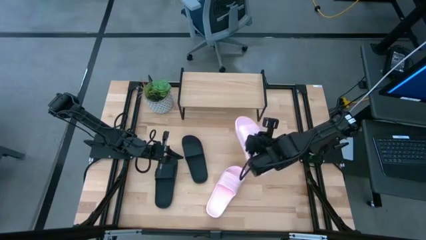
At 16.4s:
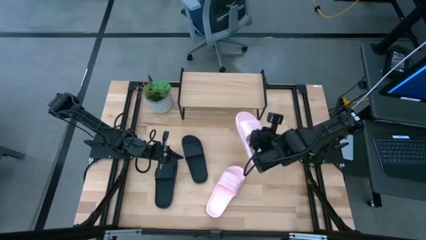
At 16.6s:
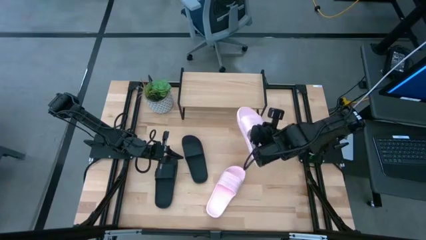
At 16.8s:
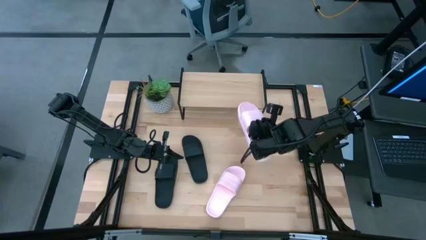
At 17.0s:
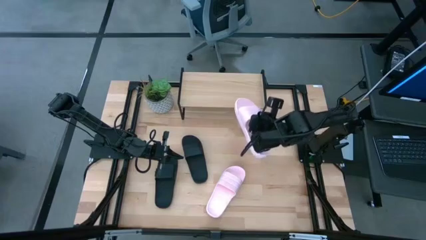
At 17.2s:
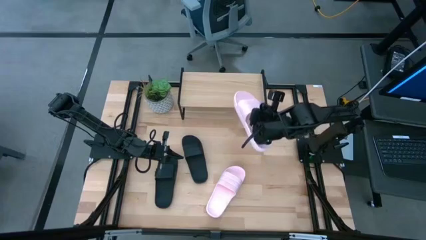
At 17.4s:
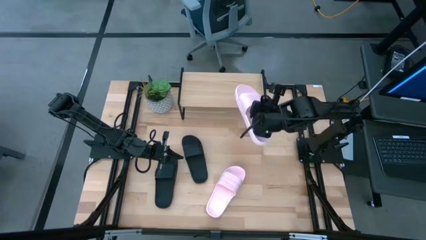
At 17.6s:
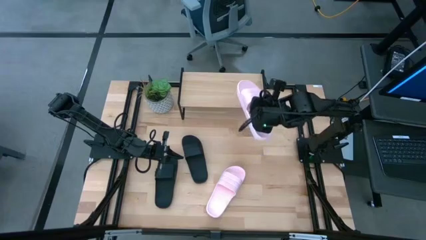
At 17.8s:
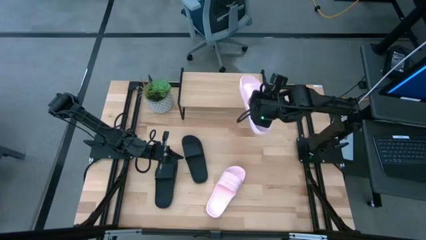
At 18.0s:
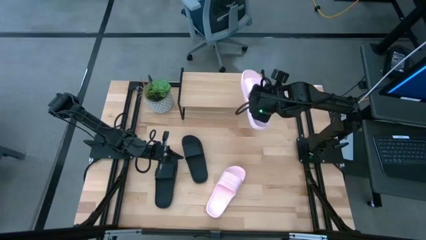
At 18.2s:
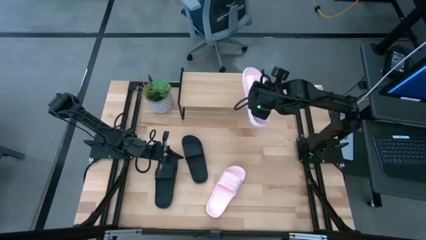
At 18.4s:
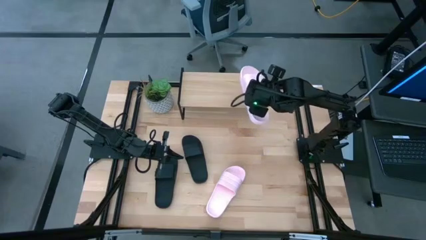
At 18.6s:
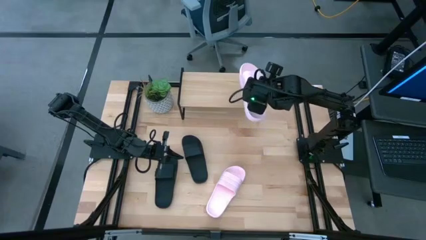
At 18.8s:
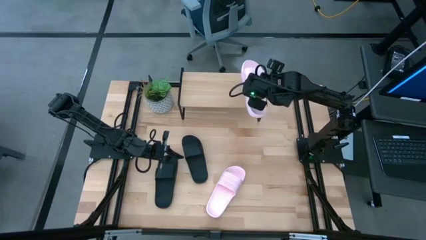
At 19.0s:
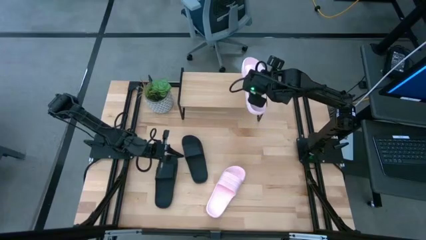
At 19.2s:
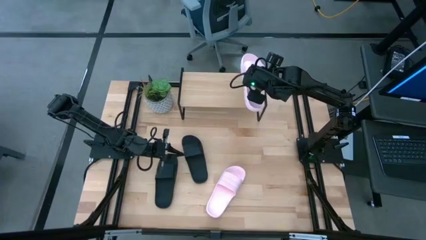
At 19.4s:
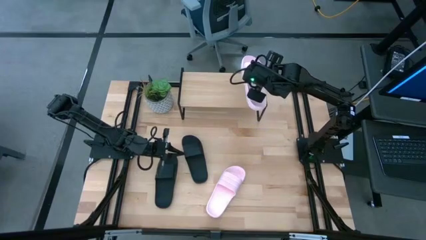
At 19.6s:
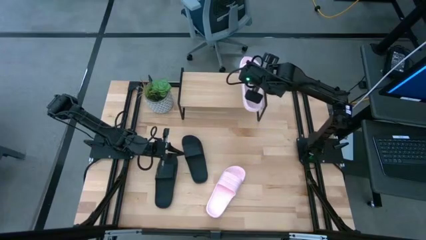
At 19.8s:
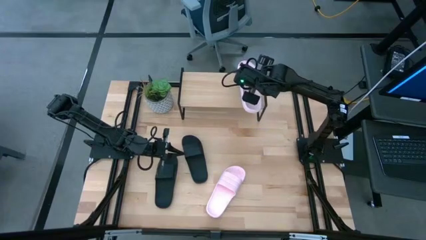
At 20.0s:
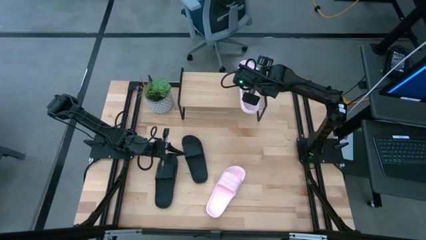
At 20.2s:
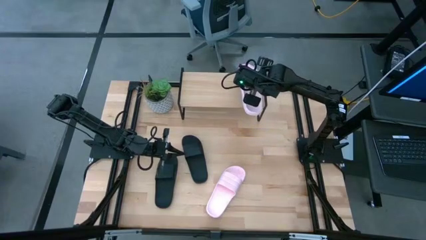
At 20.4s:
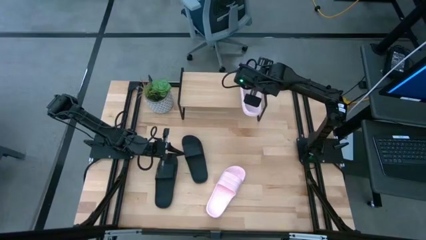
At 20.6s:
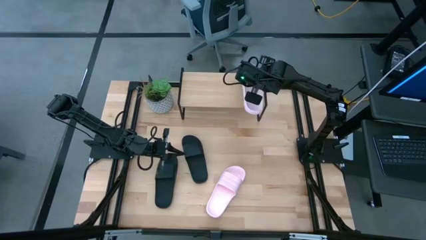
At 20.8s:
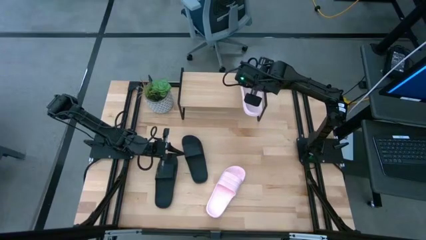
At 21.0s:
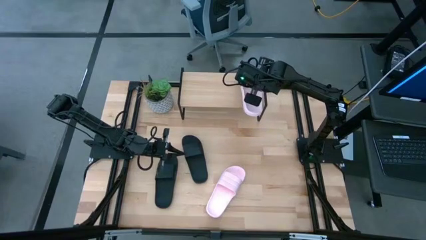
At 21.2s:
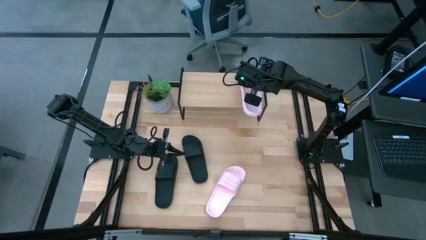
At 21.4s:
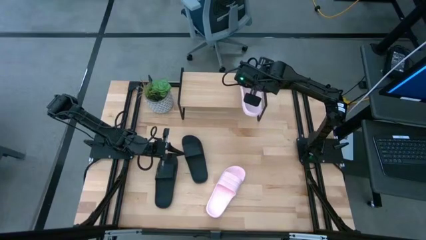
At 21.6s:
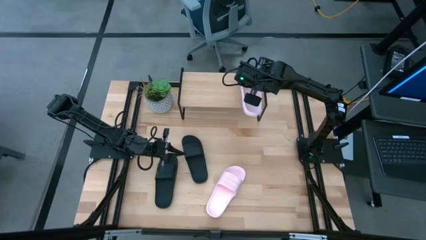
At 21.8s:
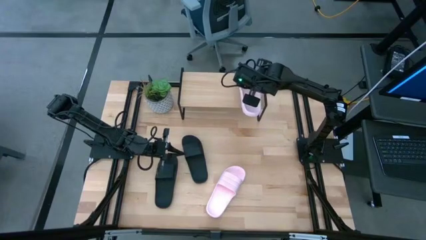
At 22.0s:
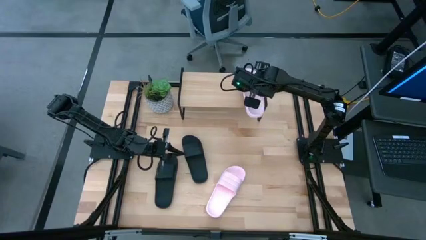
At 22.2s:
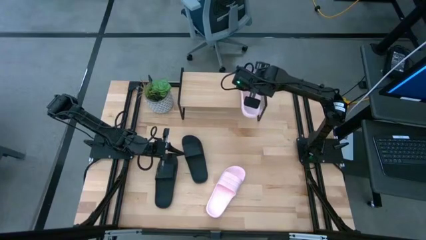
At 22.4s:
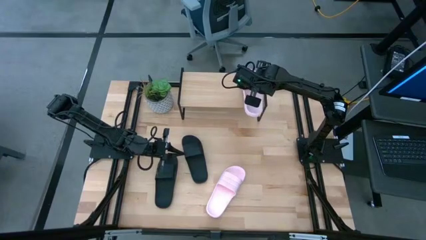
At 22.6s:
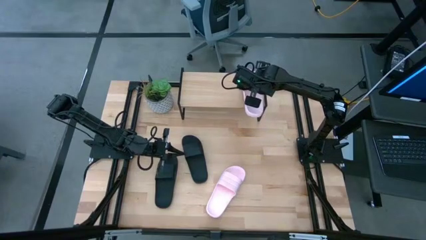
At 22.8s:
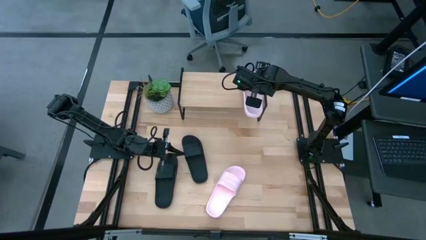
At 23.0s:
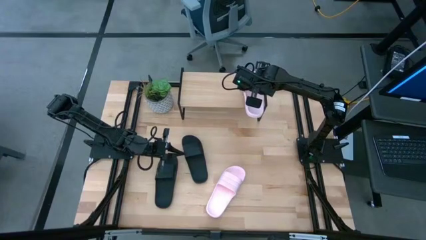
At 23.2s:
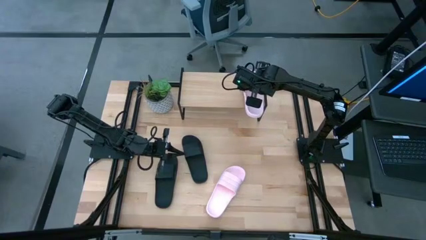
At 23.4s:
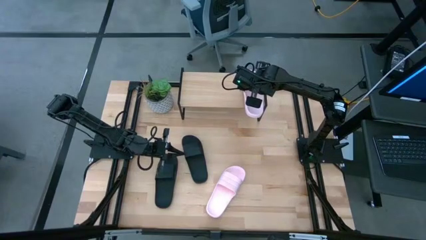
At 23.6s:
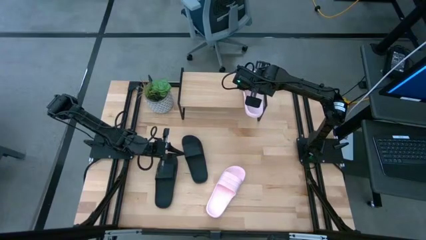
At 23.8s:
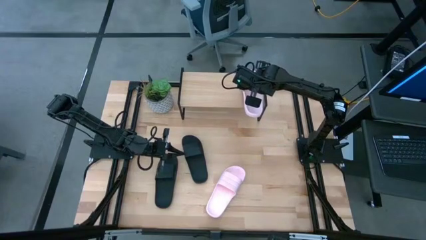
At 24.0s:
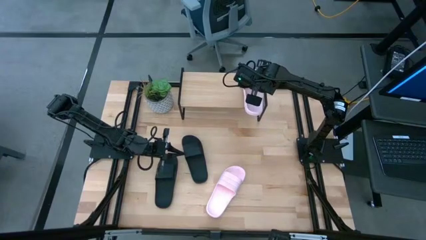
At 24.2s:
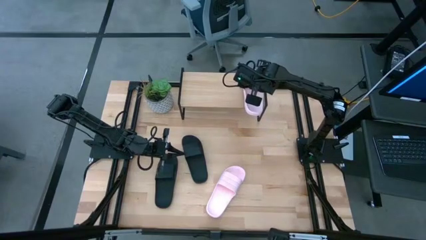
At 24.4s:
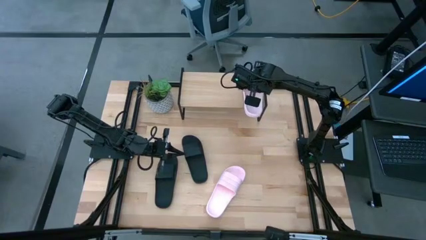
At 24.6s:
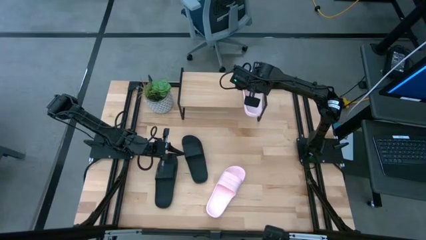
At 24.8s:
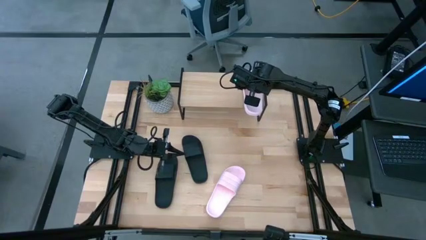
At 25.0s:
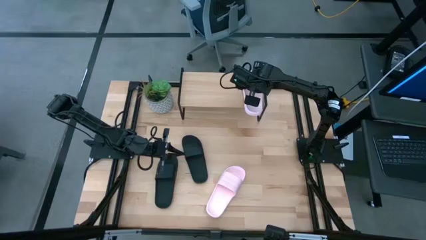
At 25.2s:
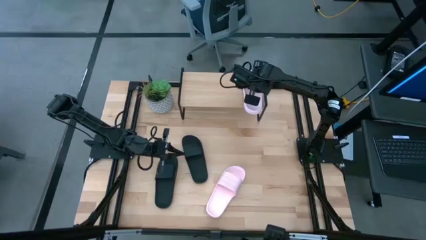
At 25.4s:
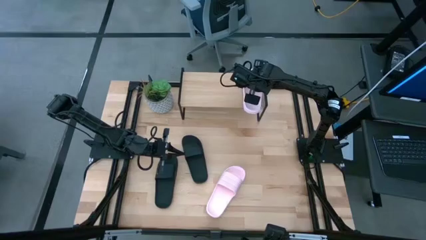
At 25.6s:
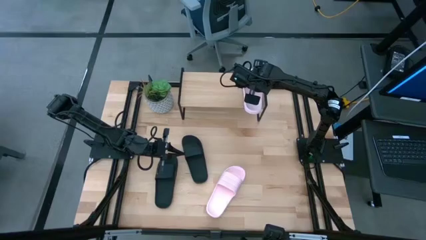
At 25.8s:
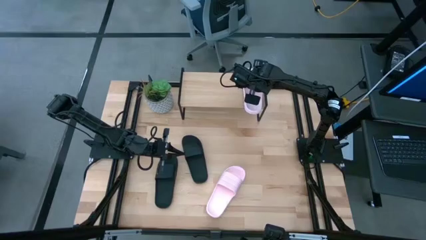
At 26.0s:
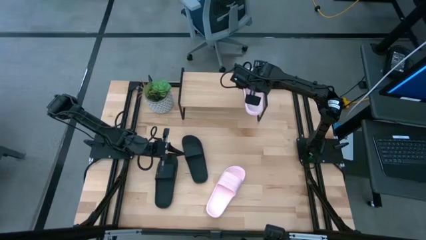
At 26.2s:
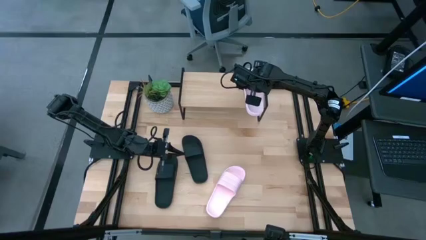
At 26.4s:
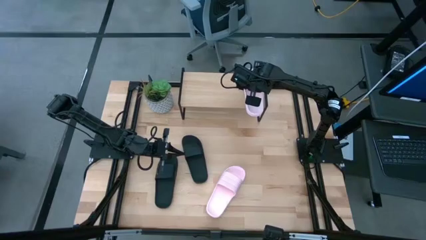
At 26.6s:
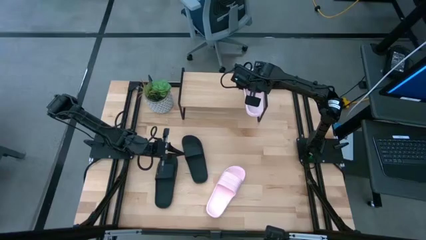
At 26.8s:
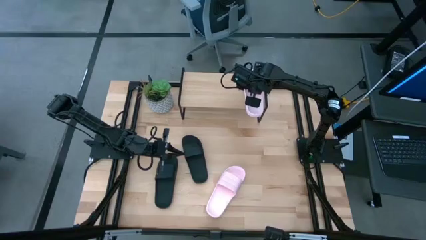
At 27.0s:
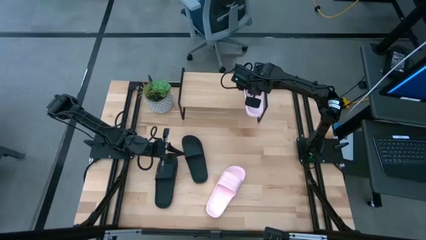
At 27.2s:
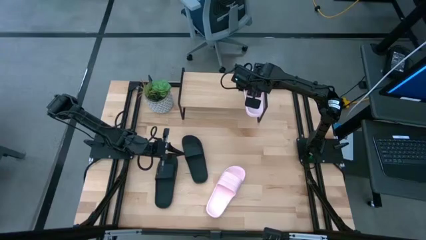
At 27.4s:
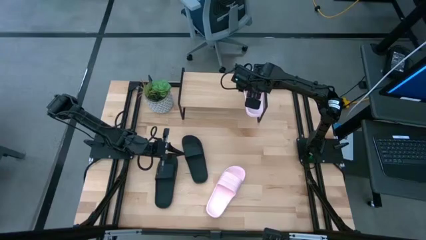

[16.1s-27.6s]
Task: Pick and place slides into the shelf
Put the top pink slide on the shelf
